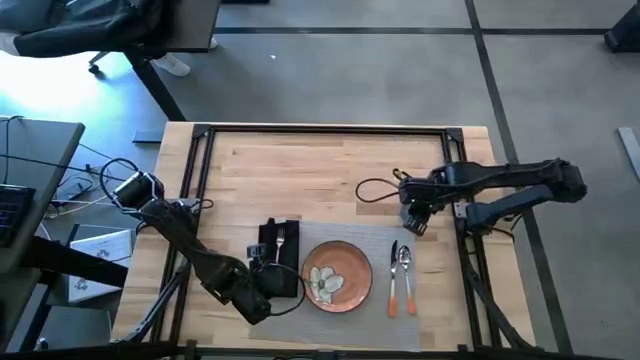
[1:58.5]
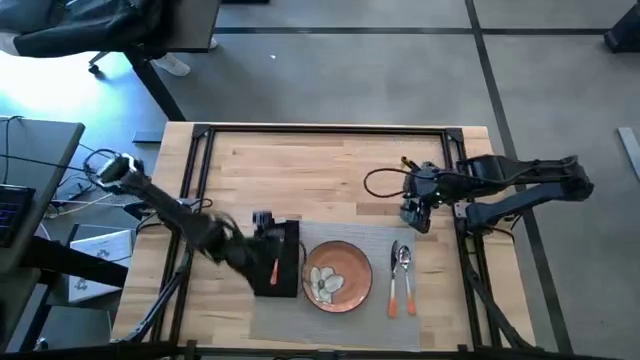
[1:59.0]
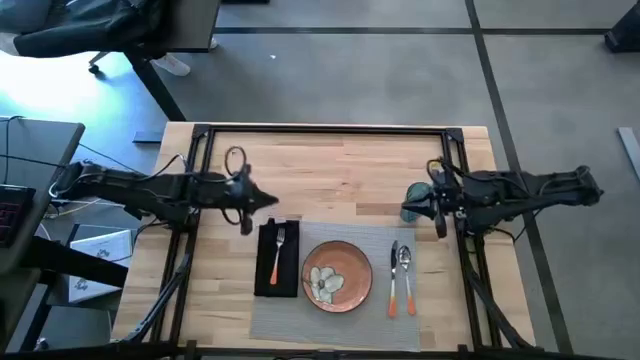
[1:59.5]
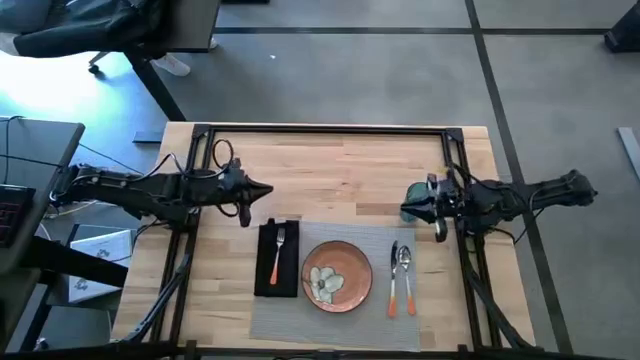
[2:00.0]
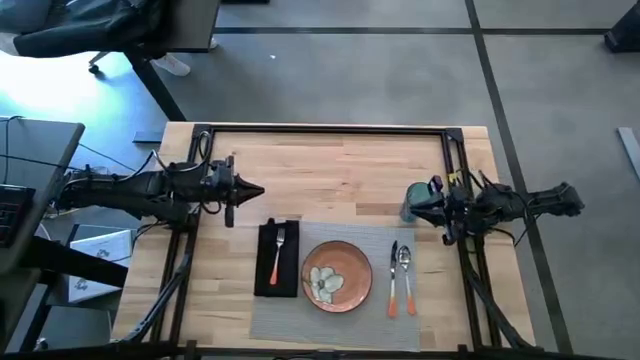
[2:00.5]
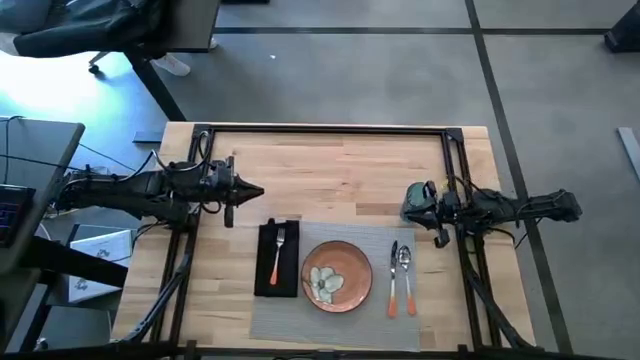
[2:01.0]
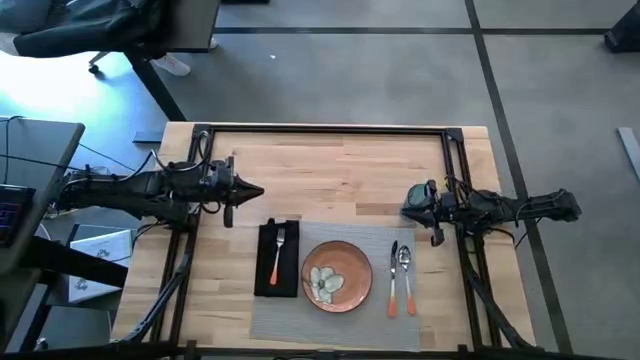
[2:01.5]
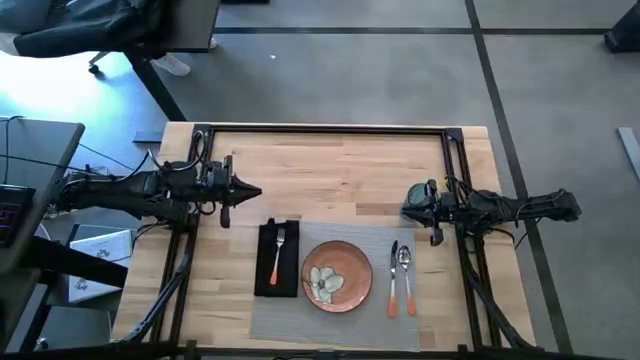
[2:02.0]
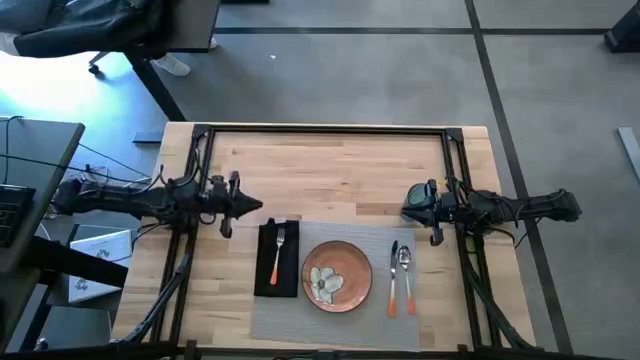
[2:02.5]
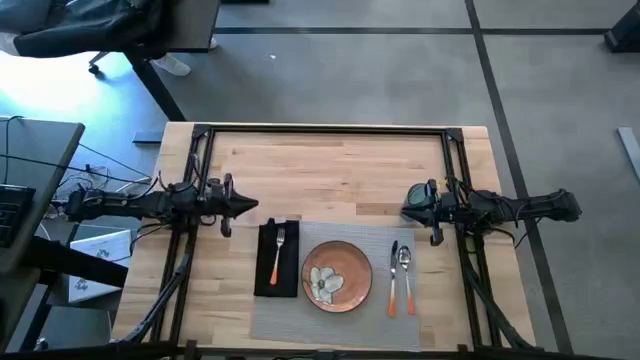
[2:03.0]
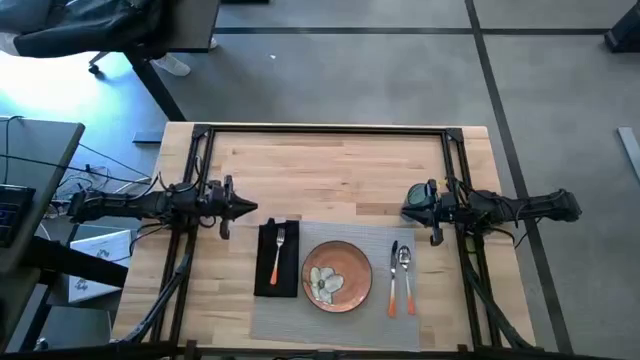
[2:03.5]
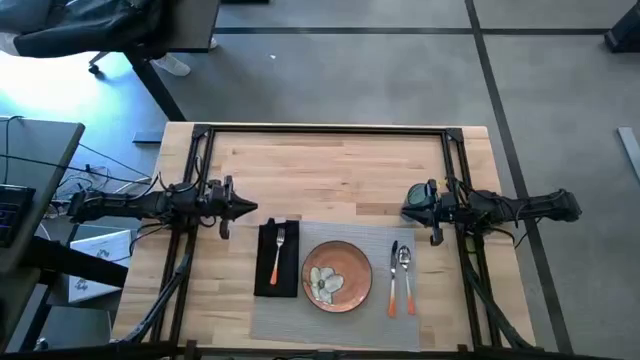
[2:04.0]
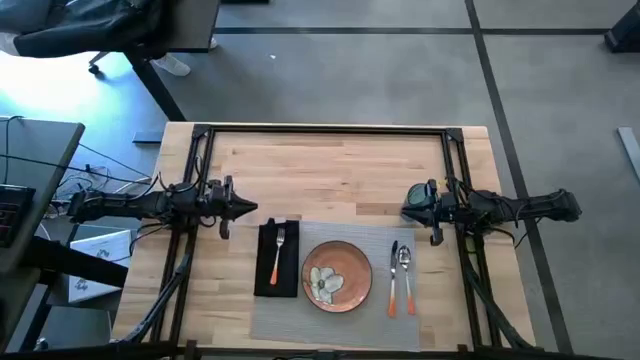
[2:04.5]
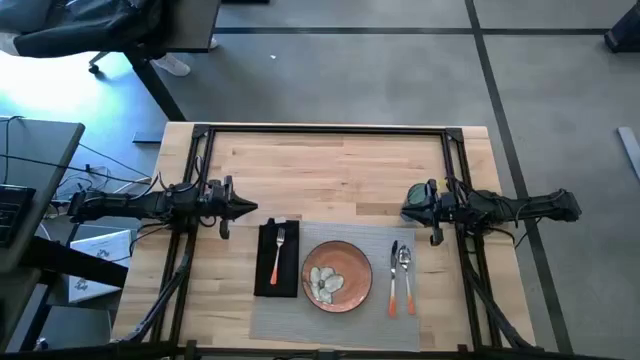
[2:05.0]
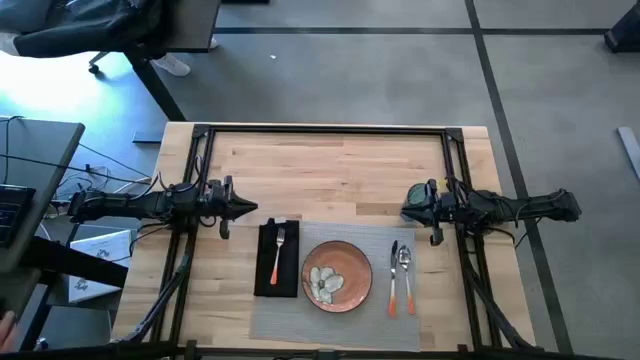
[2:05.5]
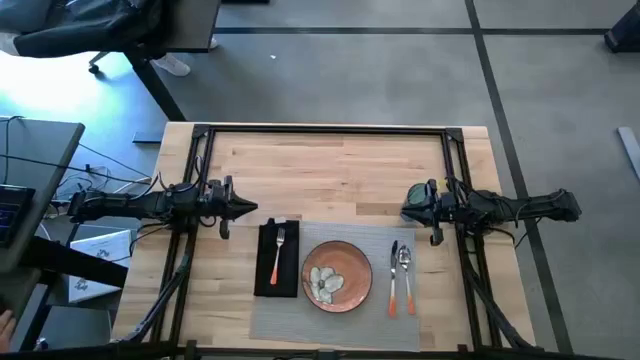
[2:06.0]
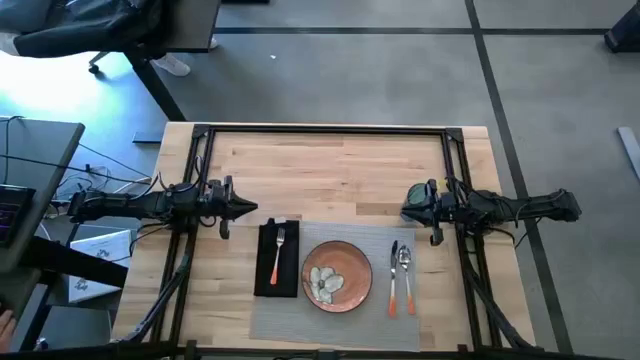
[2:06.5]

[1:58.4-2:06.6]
Task: Set table place
Return to Home Position

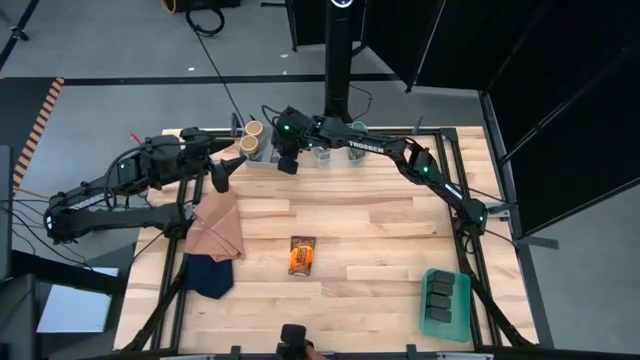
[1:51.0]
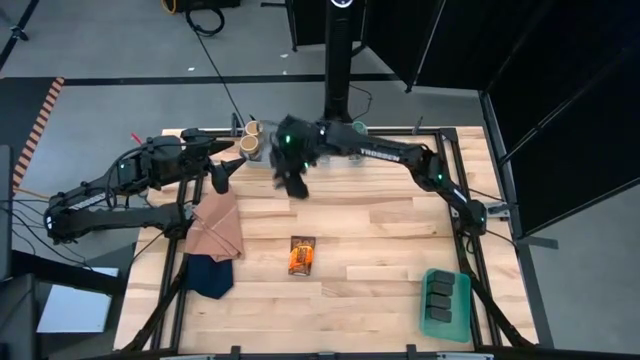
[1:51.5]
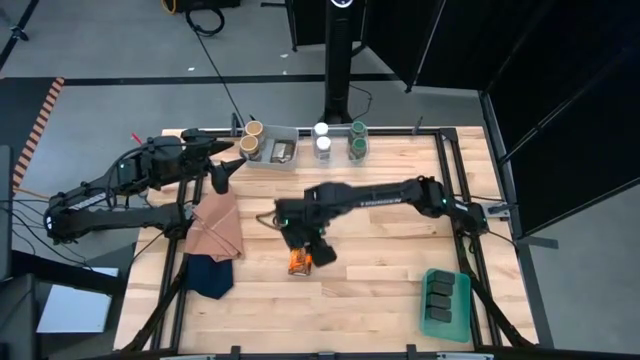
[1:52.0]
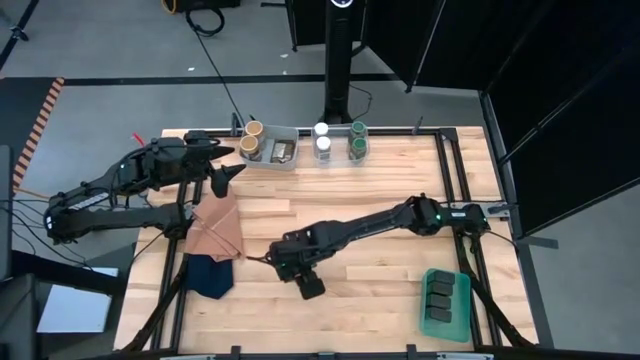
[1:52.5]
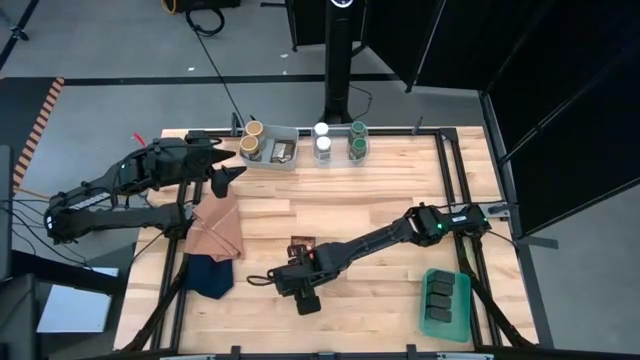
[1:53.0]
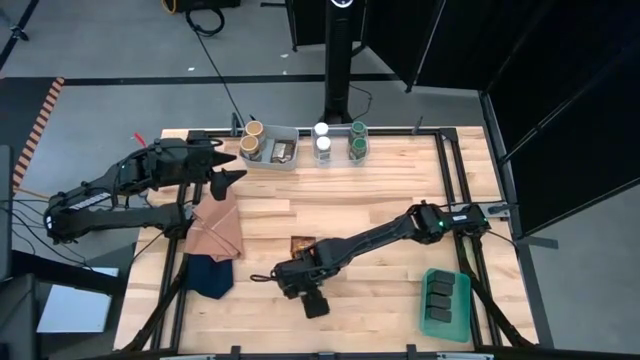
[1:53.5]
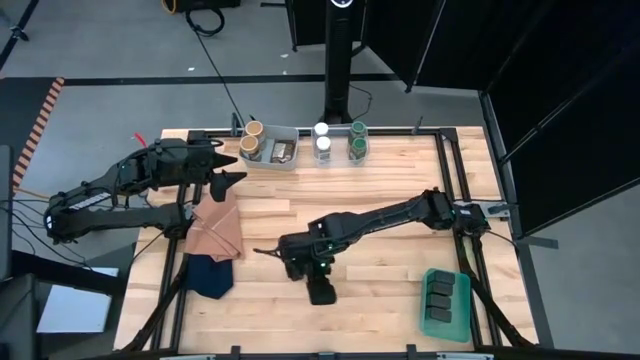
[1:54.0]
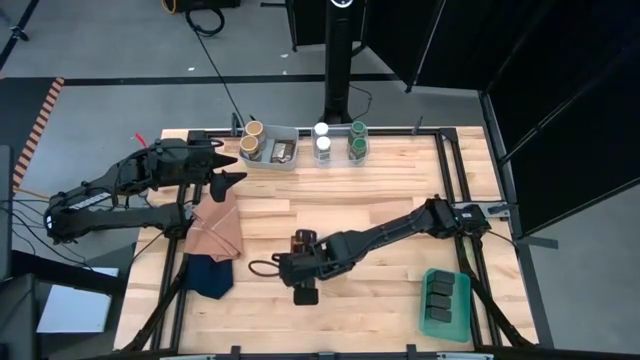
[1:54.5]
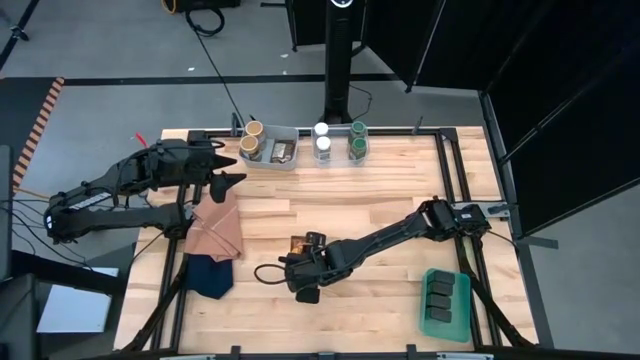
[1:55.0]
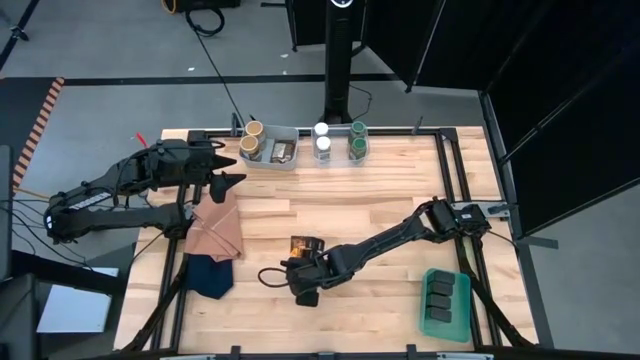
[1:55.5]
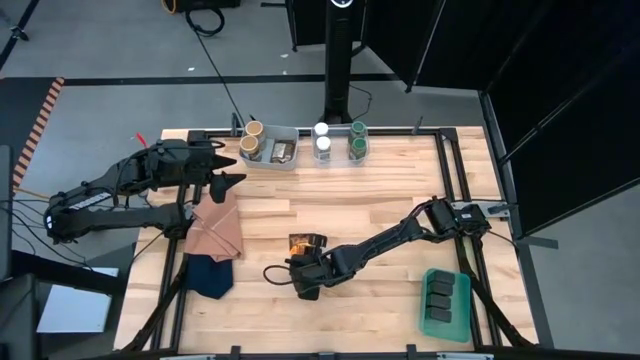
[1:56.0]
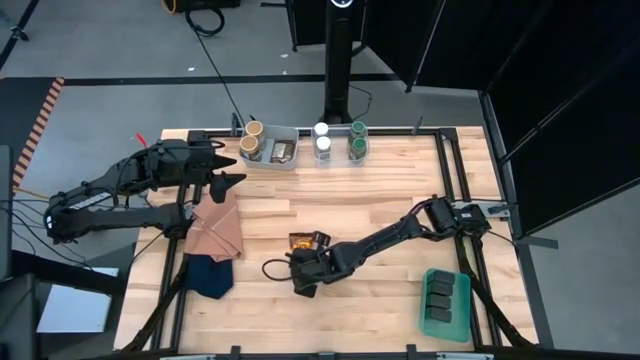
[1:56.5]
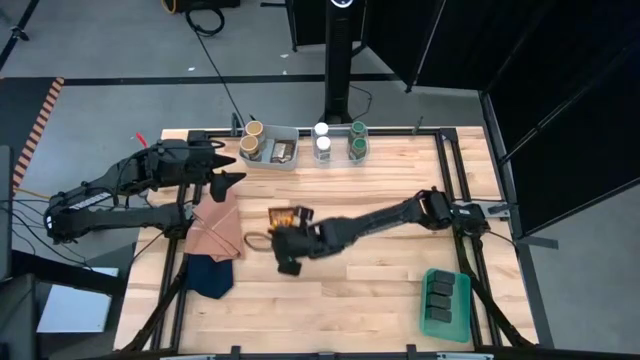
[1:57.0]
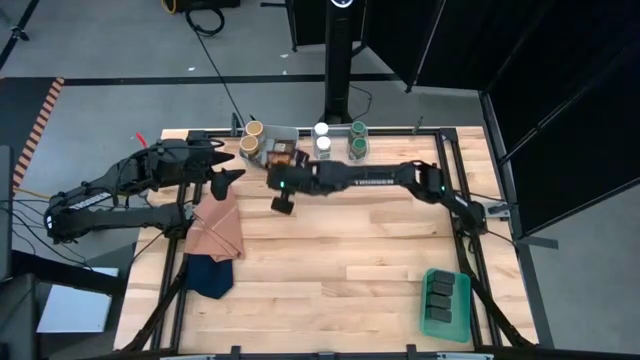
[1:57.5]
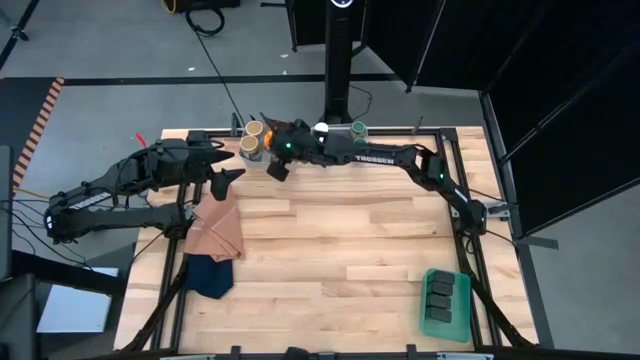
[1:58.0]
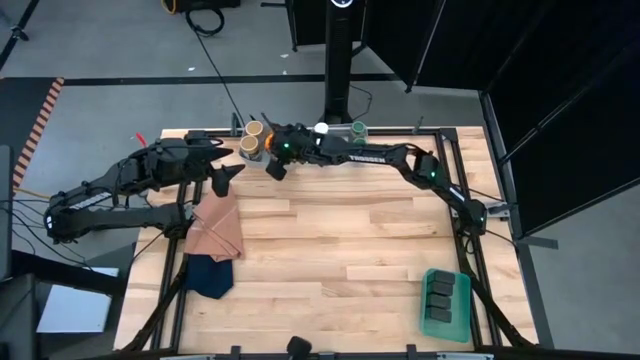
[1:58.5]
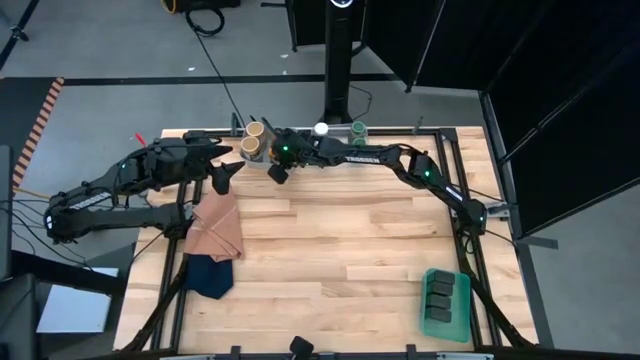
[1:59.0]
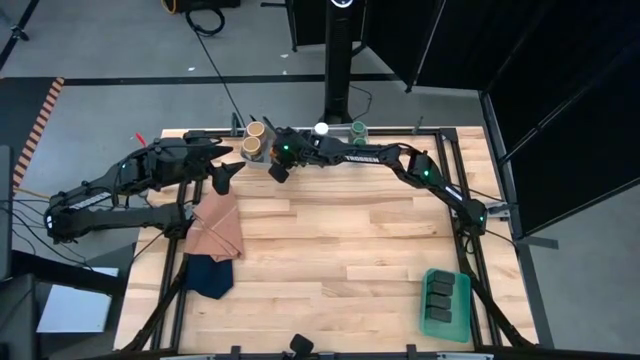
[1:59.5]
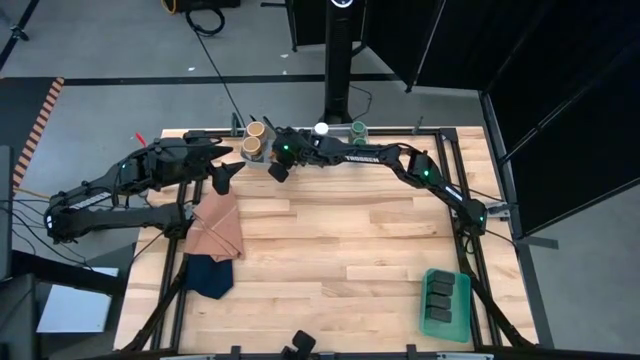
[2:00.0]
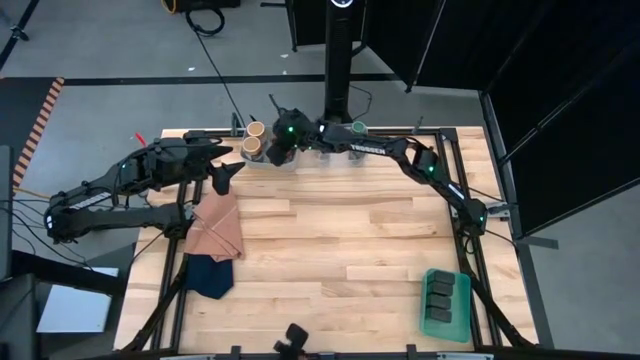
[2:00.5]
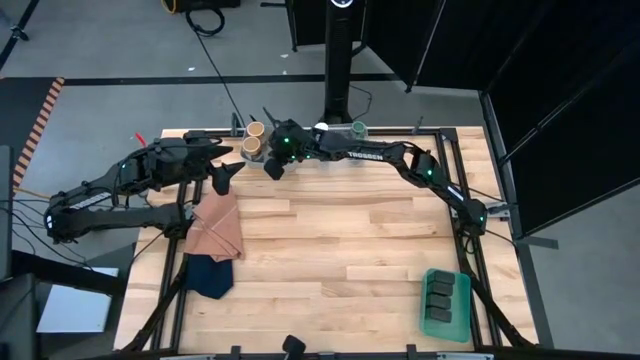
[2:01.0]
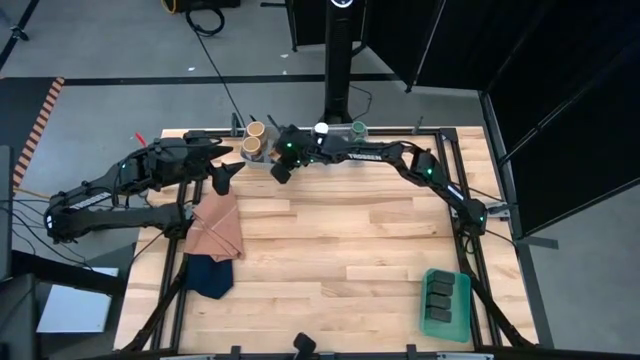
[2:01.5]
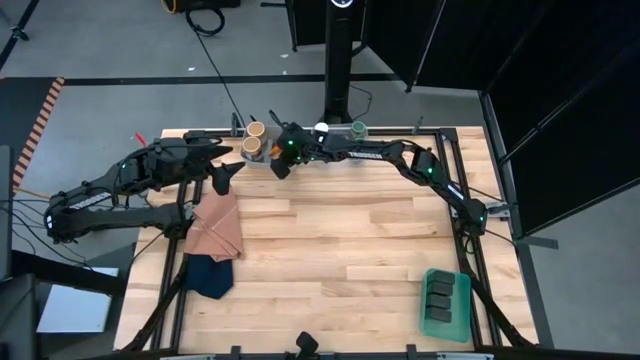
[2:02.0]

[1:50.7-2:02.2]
Task: Sort spices by type
Put the orange seasoning pack into the gray bin
